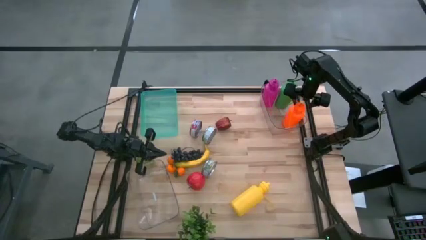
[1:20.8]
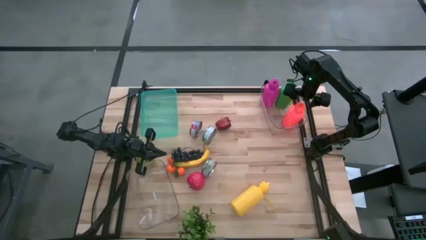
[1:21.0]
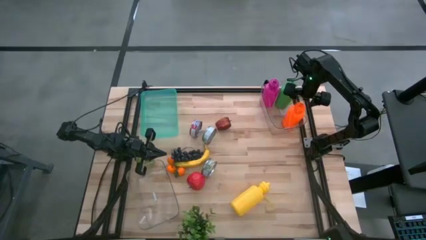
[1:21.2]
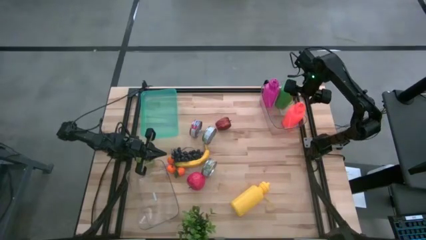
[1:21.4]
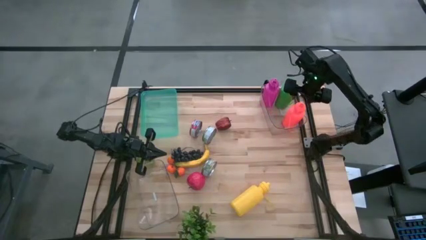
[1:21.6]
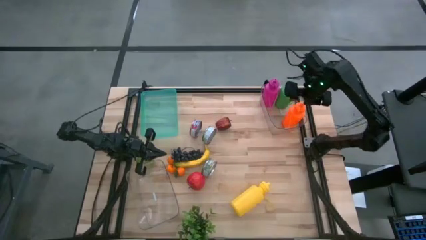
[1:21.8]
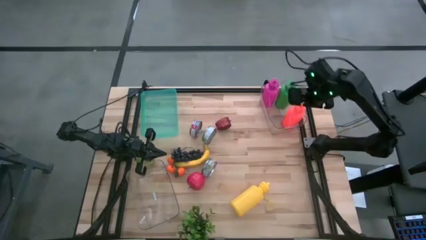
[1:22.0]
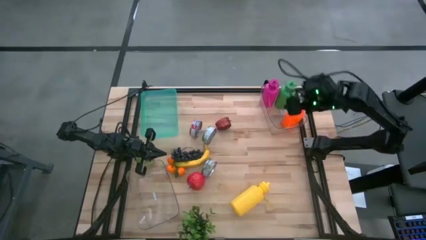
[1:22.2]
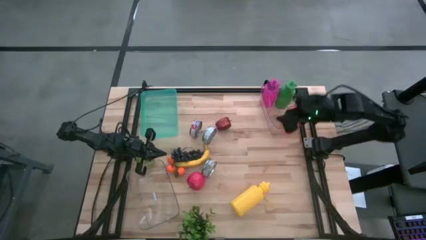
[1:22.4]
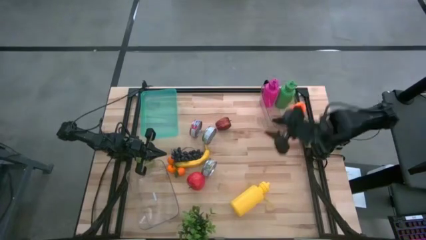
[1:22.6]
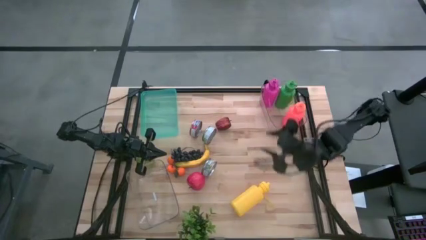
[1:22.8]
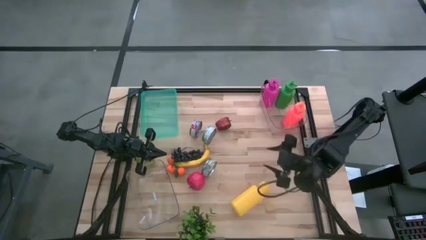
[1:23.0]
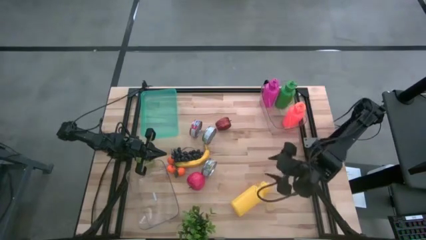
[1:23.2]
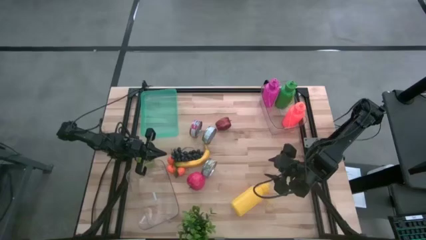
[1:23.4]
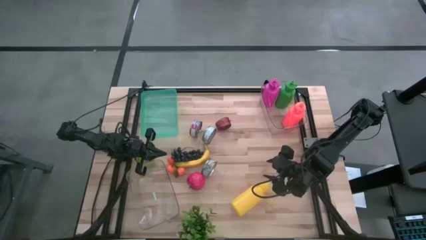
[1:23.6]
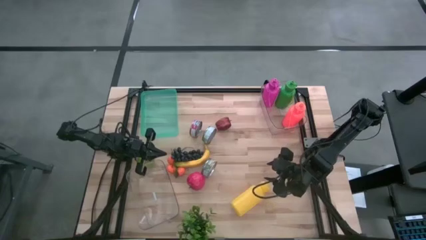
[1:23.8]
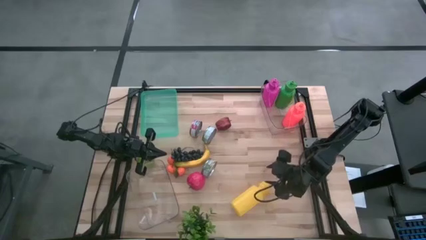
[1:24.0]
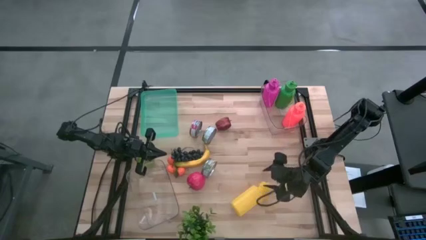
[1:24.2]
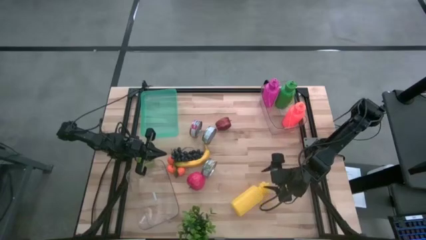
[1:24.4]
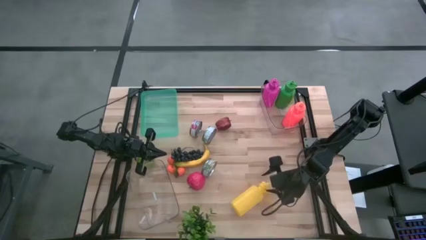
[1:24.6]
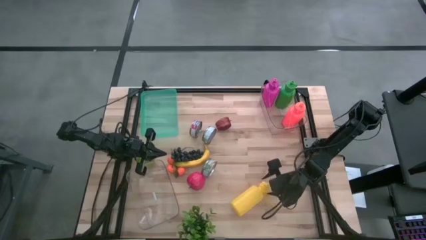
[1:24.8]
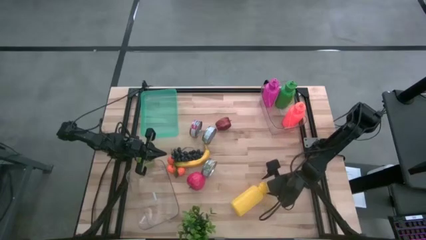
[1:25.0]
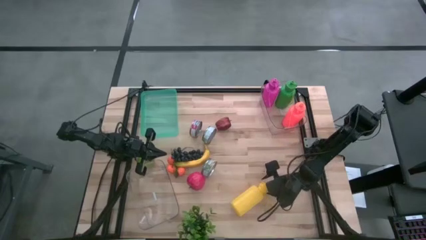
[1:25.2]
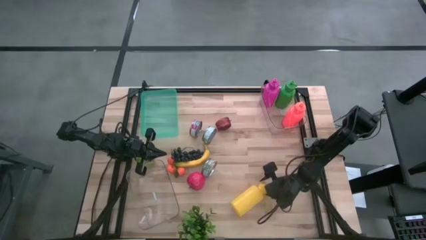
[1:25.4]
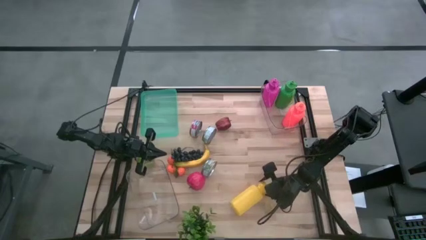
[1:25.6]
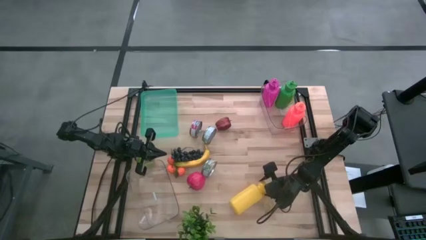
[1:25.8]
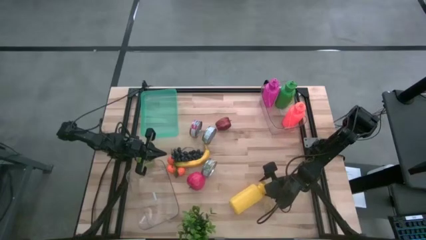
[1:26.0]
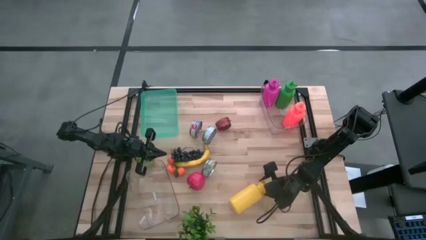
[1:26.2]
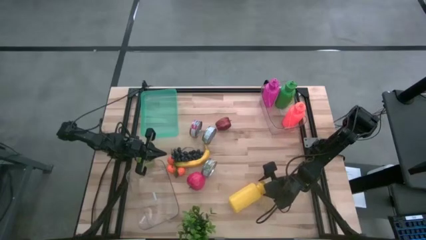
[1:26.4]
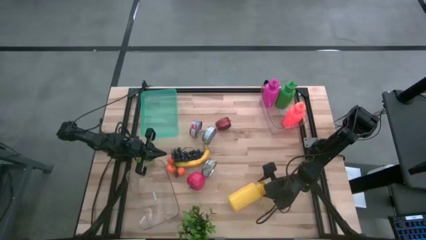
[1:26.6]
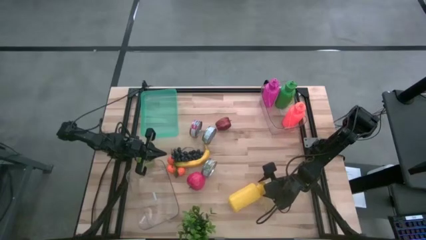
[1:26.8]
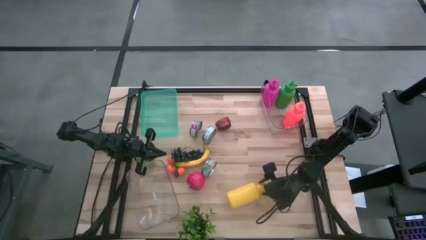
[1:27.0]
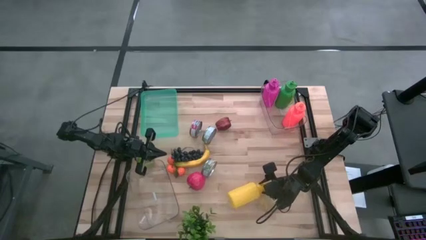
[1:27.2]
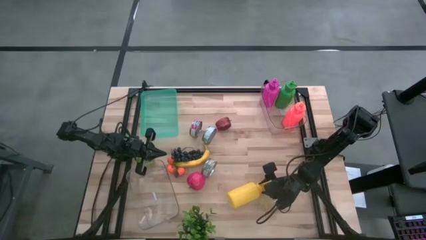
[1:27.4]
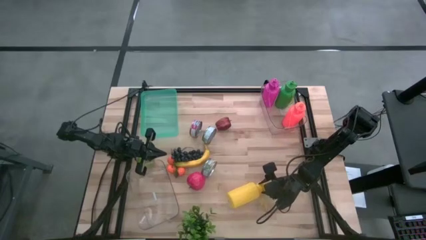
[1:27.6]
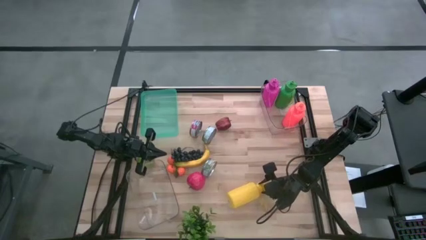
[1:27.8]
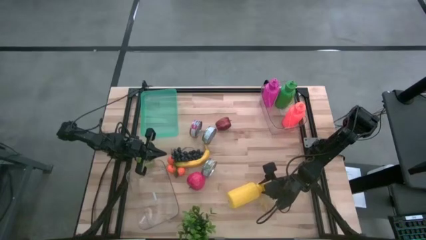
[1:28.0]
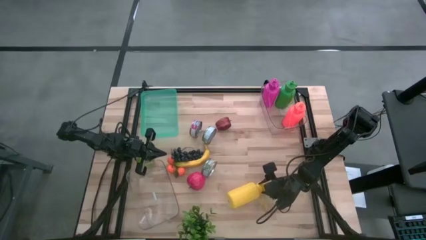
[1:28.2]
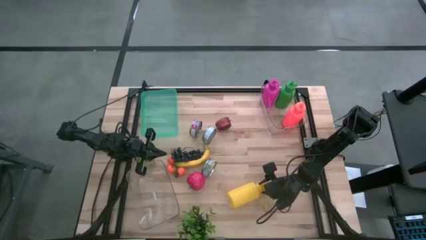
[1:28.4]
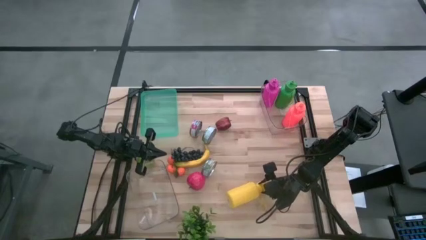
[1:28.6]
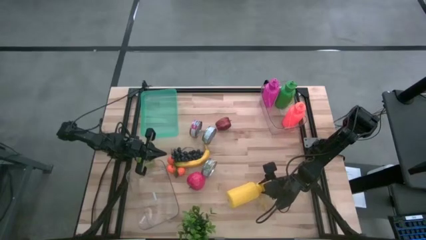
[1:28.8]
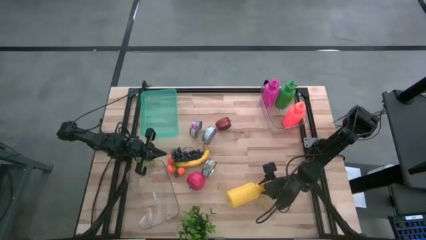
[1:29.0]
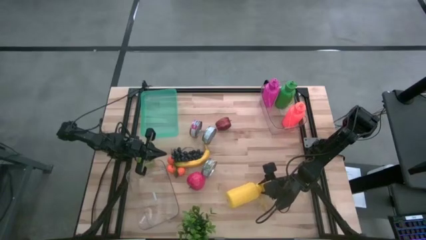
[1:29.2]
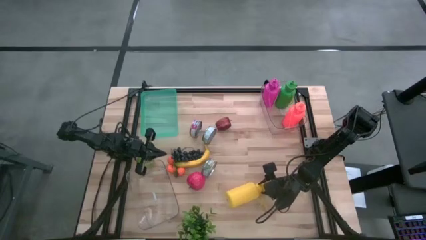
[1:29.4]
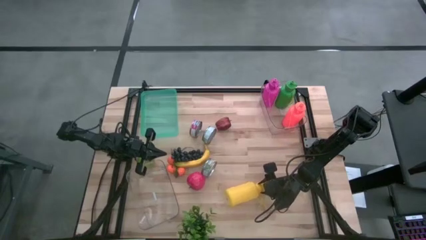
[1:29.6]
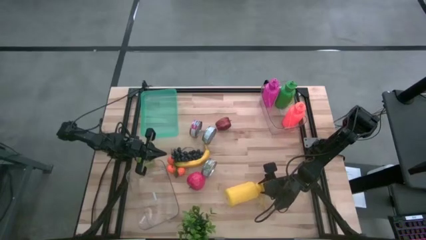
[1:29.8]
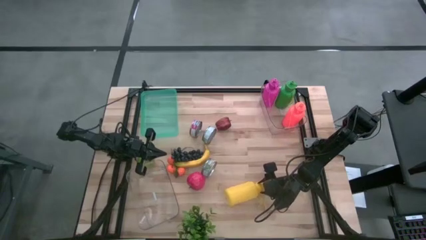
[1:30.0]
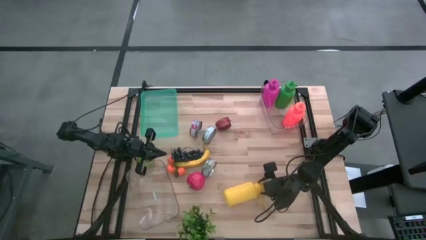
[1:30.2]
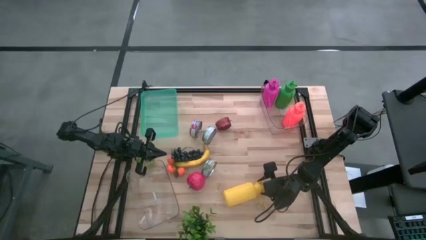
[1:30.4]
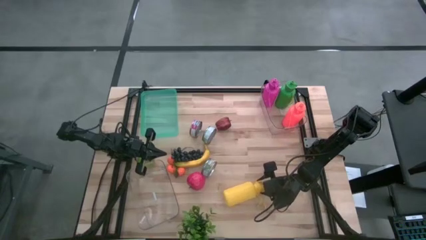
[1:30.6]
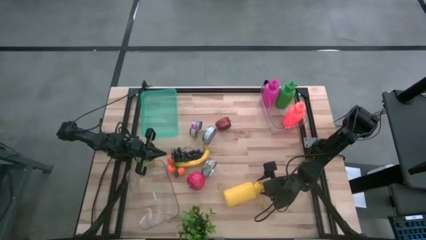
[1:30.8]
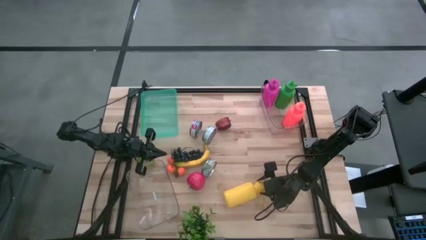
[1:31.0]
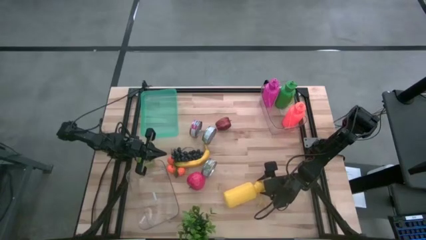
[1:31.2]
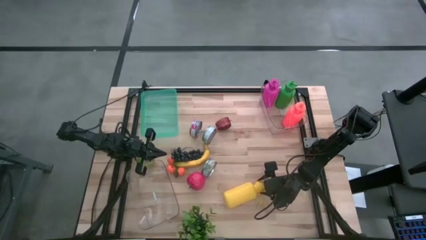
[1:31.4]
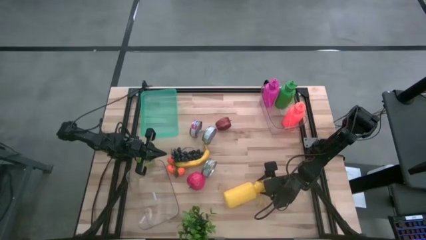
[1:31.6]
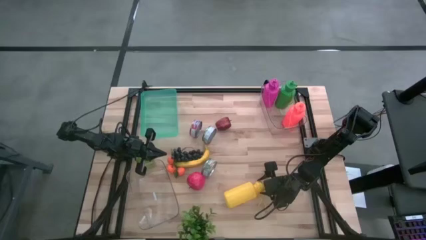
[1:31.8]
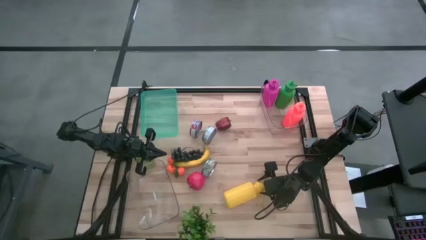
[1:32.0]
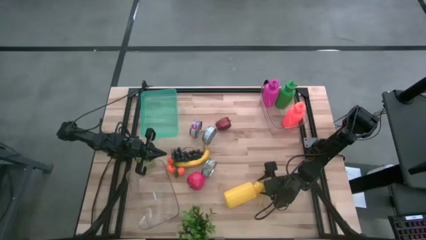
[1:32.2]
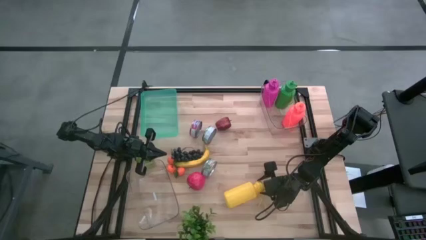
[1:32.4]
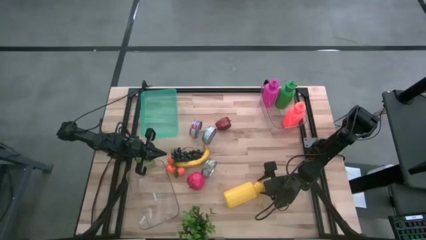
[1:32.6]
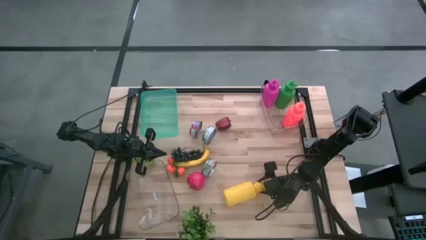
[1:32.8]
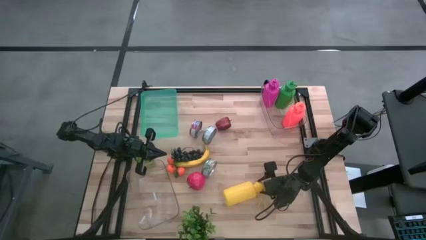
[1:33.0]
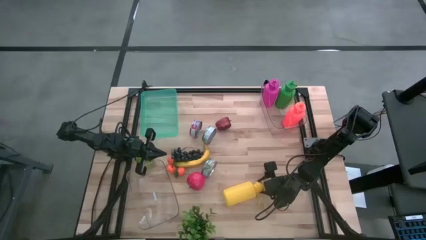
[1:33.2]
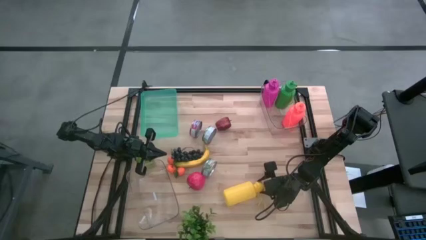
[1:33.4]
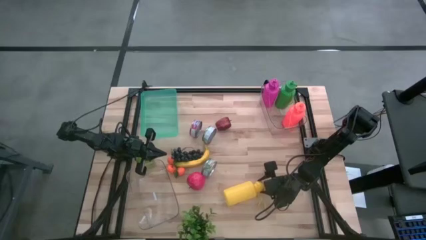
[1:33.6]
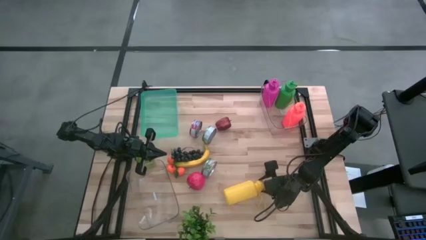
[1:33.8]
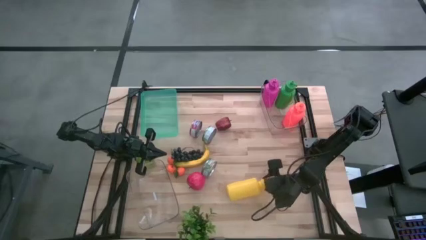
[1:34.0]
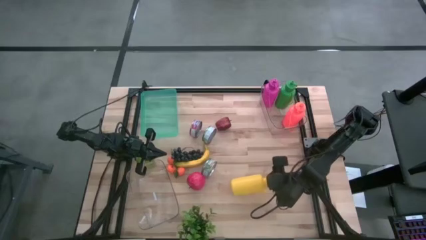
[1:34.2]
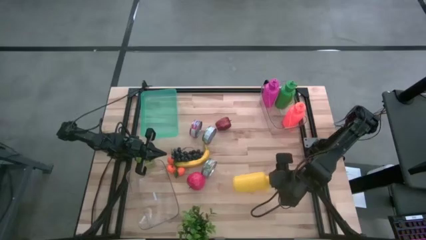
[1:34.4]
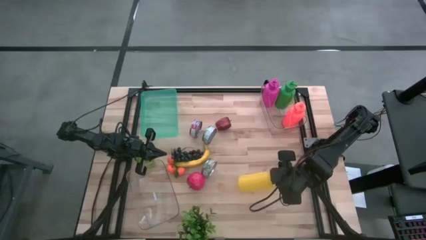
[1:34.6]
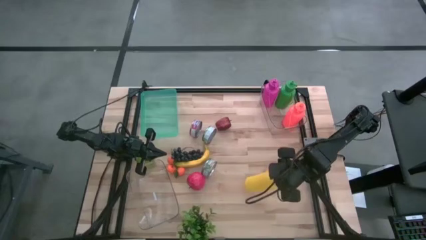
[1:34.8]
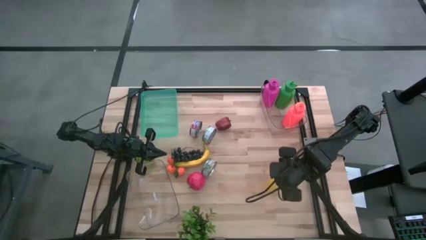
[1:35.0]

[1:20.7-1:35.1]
Task: Pick & Place Food Item
Put the yellow tumbler bottle into the top right transparent bin
